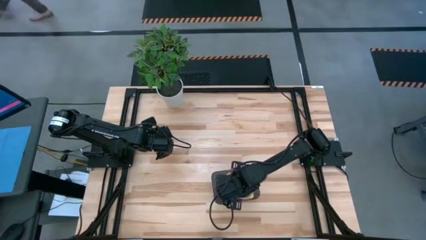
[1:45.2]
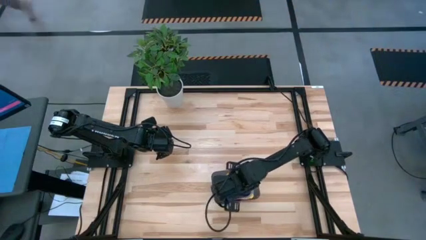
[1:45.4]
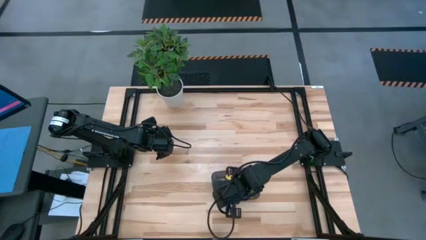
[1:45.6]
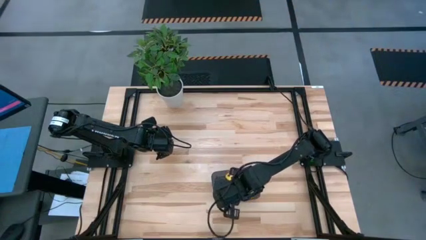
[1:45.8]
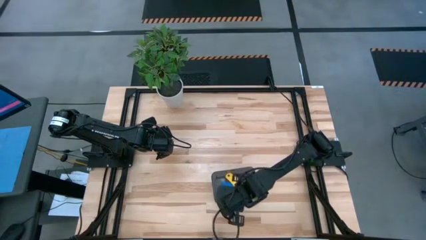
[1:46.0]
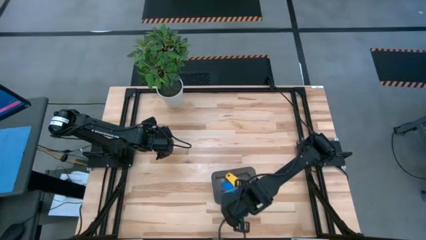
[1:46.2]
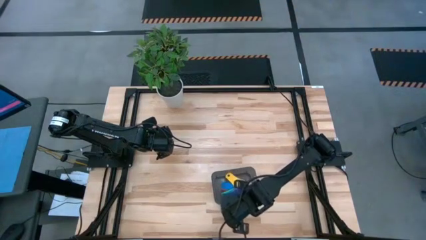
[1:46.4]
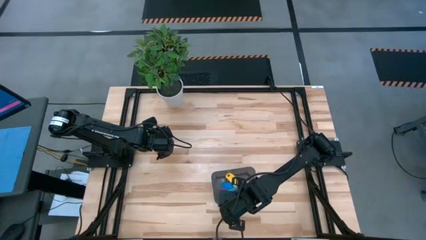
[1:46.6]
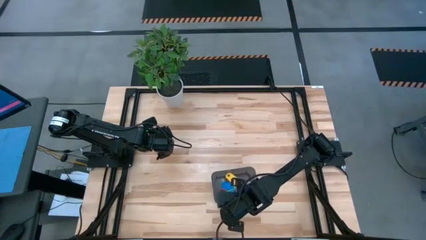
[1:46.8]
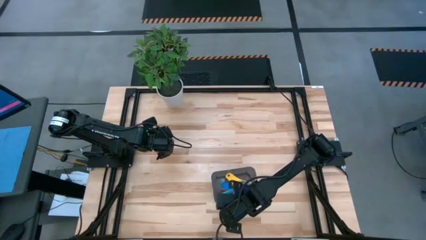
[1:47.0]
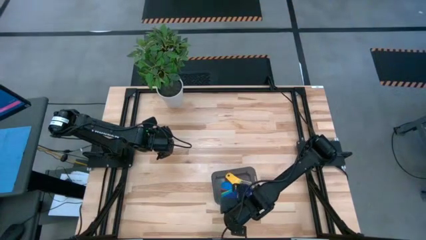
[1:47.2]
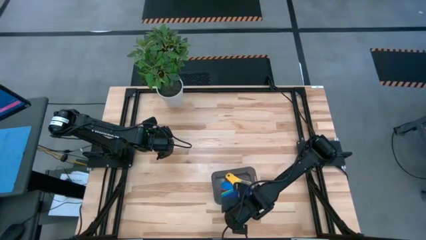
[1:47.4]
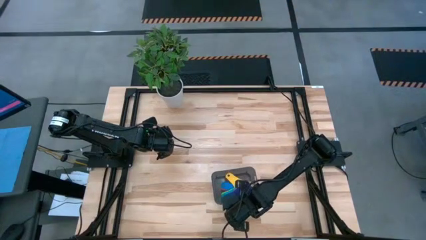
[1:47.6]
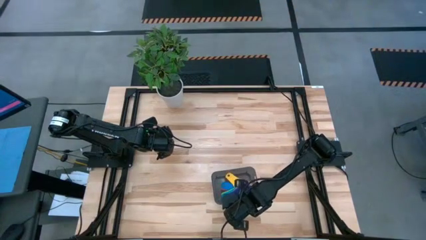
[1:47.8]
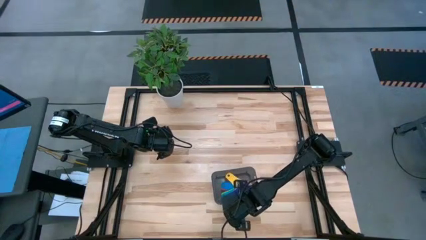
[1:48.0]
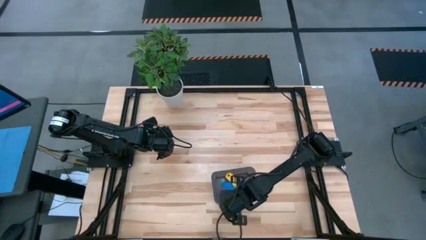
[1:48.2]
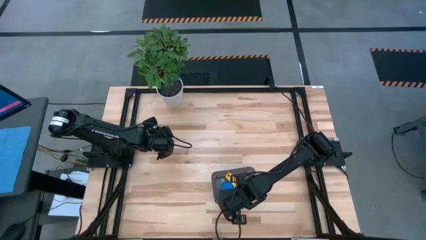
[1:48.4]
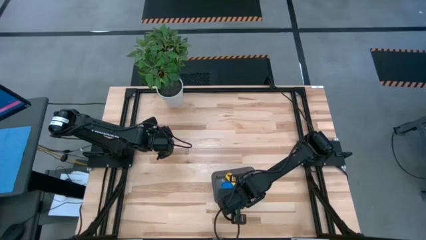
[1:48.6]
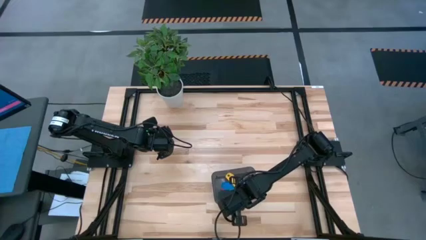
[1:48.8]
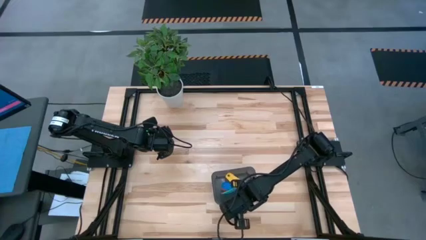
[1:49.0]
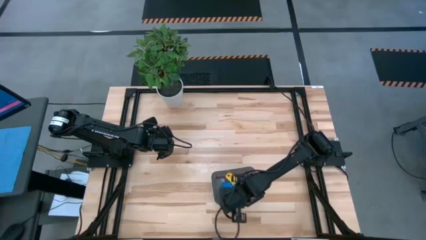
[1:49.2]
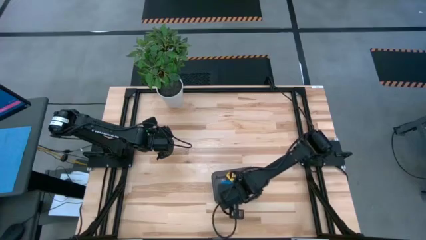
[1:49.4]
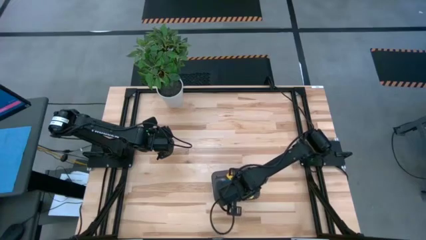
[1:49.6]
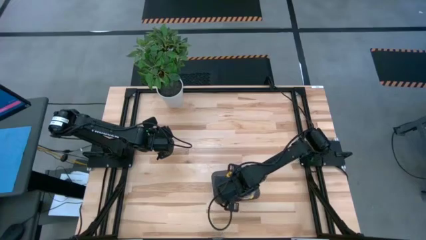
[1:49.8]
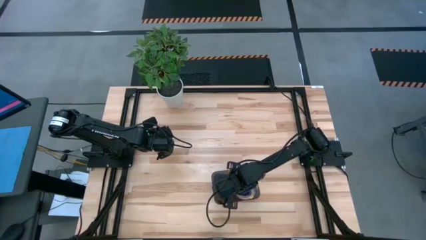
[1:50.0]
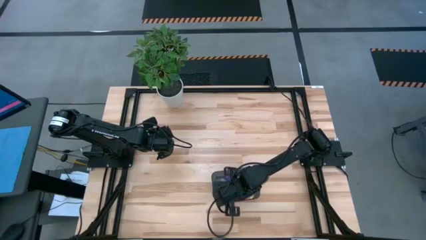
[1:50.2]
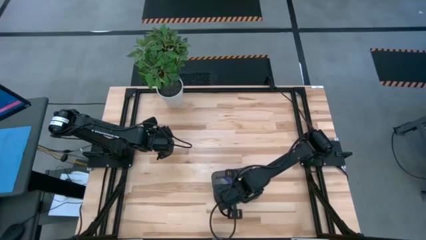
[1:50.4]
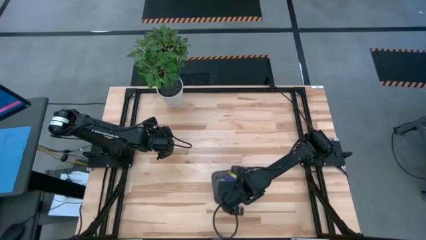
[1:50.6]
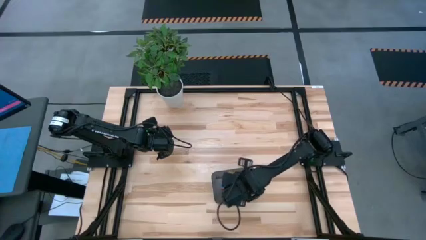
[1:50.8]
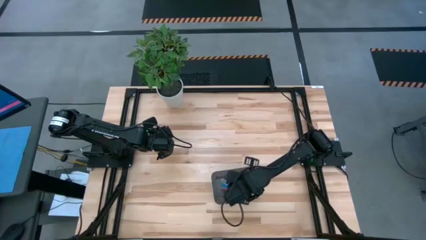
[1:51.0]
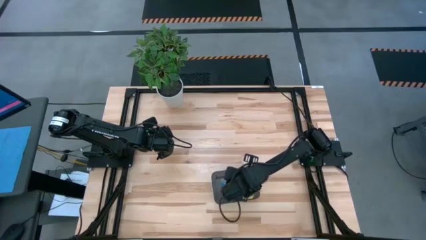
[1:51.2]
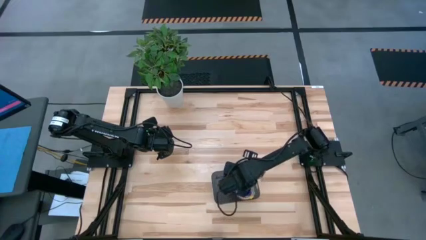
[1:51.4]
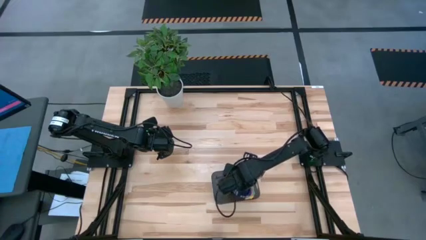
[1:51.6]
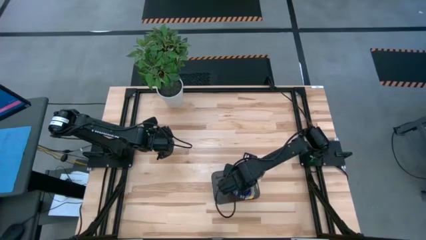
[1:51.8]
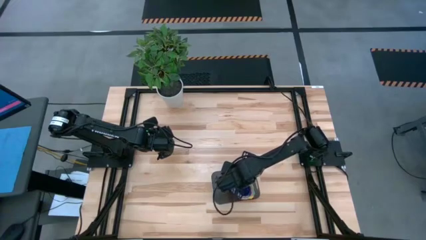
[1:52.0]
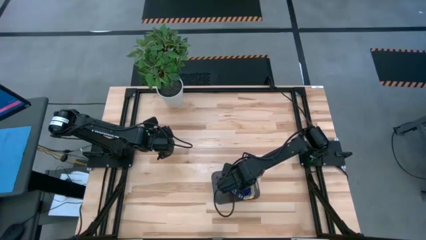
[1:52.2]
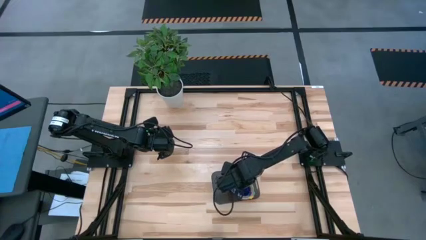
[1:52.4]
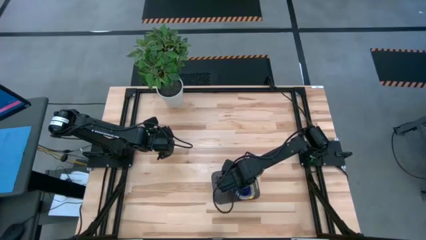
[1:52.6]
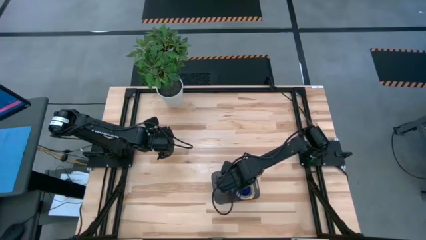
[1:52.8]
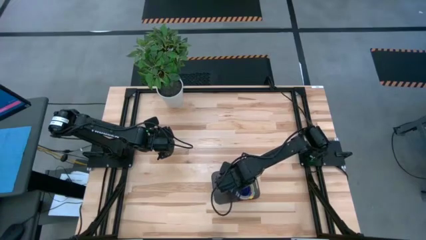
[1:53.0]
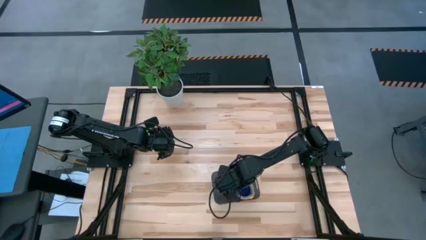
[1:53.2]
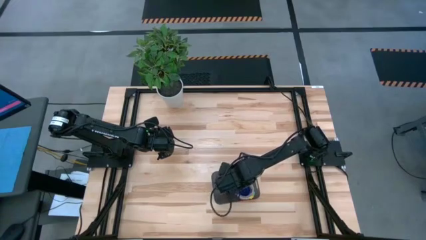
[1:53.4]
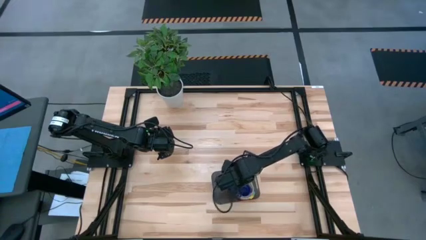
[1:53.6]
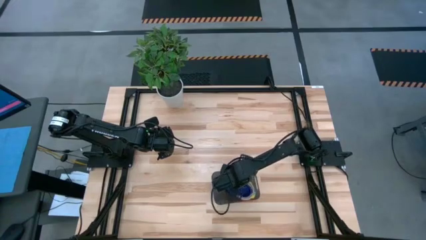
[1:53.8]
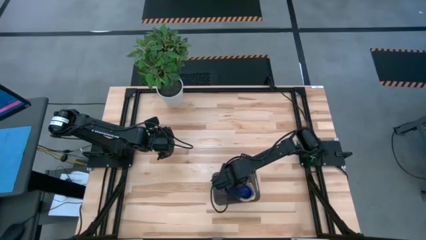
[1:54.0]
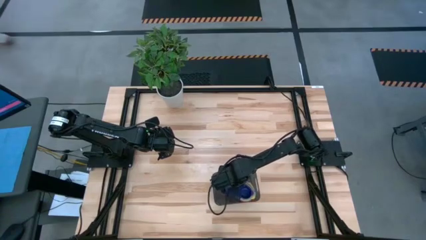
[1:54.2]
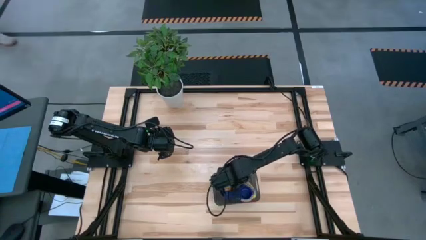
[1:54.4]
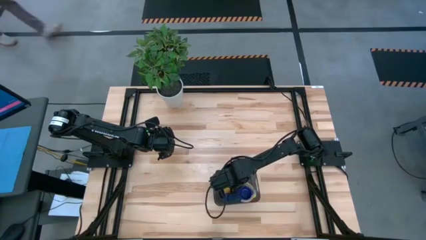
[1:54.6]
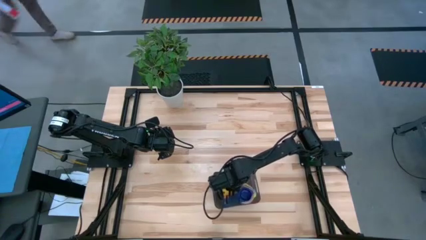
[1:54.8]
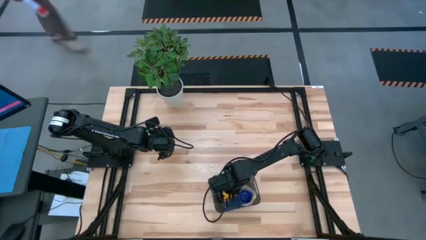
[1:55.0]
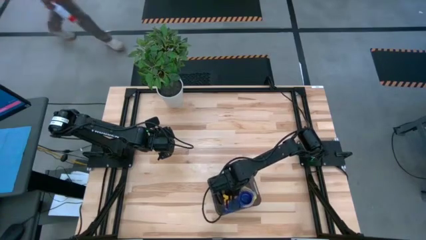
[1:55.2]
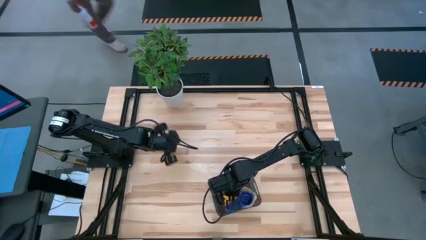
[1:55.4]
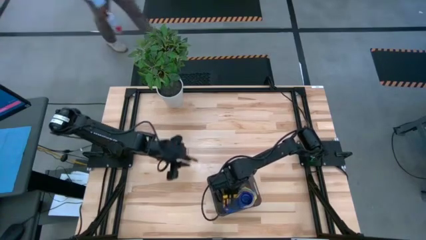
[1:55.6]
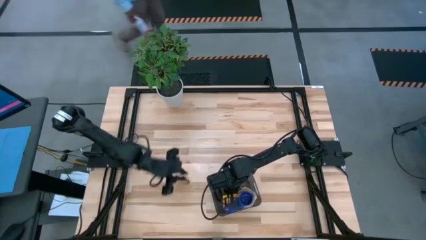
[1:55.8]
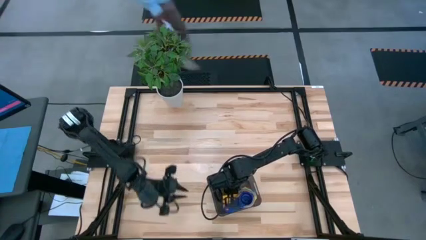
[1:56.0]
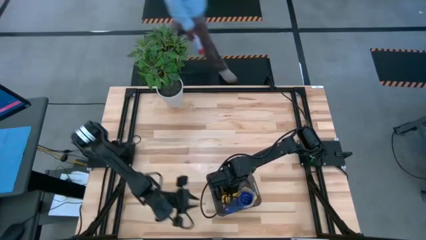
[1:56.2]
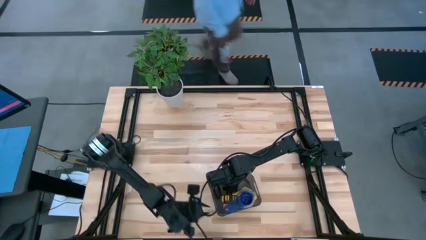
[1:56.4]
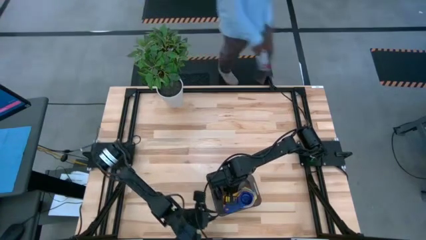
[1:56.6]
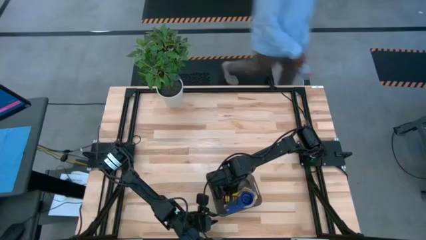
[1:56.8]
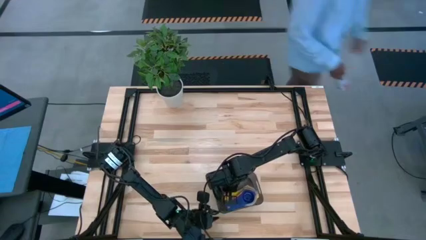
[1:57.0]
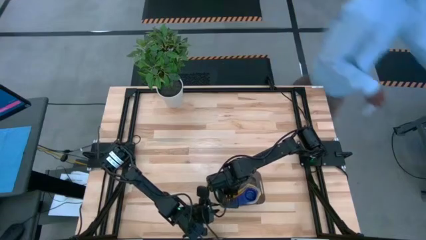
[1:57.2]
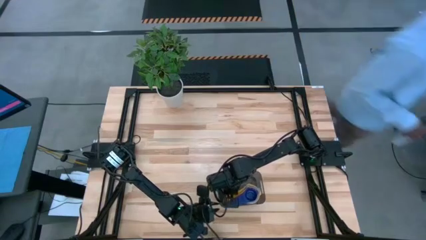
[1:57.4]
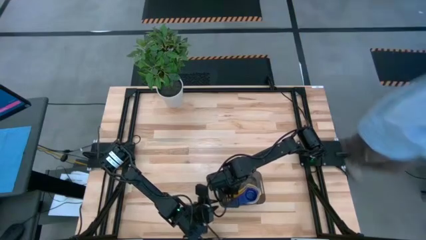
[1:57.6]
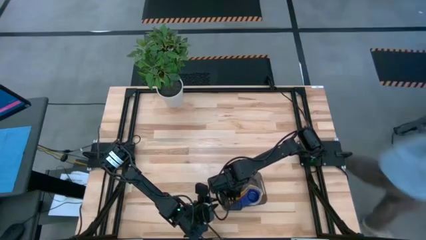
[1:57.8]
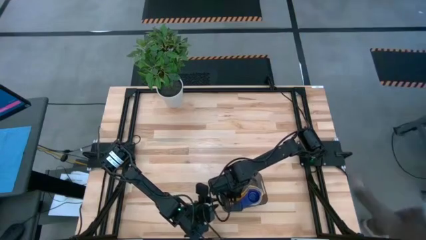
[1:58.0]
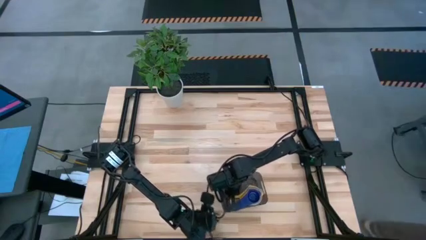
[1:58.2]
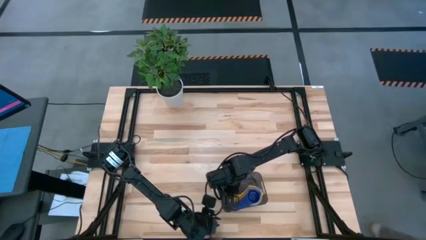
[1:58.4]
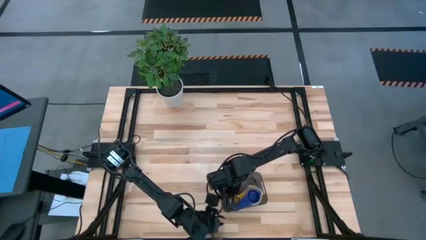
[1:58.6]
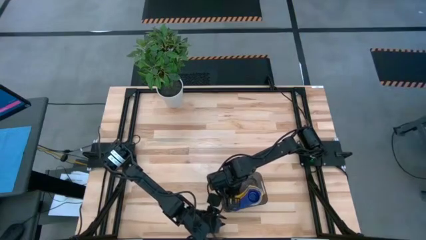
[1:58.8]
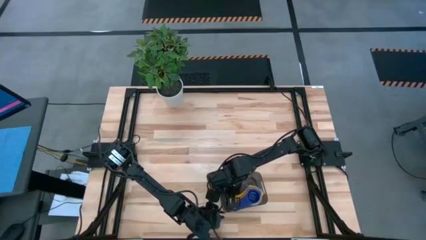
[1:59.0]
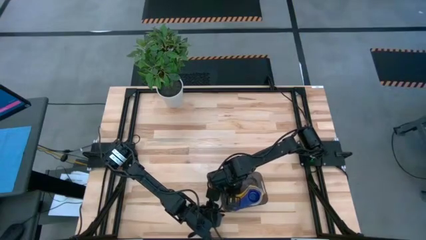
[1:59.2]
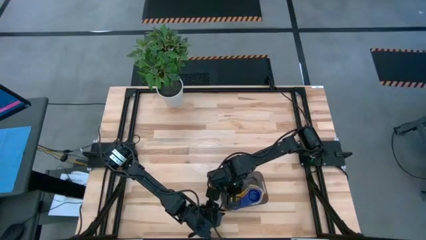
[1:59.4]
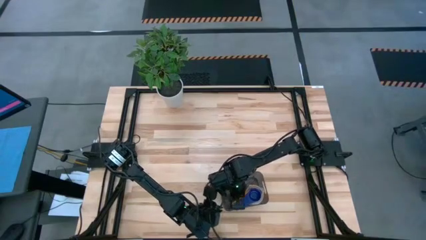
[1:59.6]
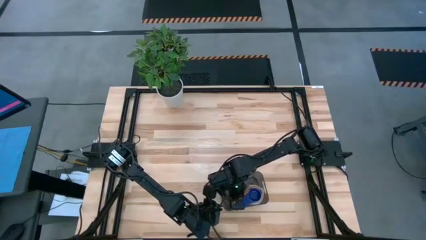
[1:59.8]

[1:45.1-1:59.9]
Task: Nest measuring cups in basket
Adjust the nested measuring cups in the black bin
